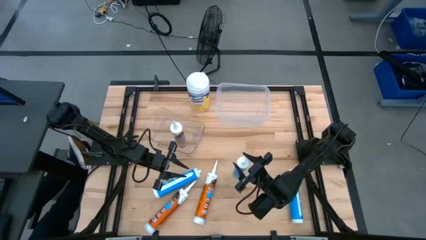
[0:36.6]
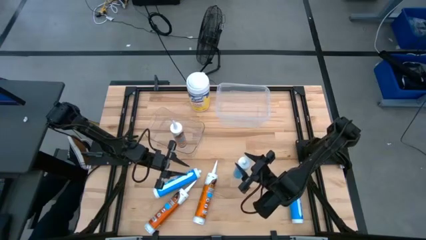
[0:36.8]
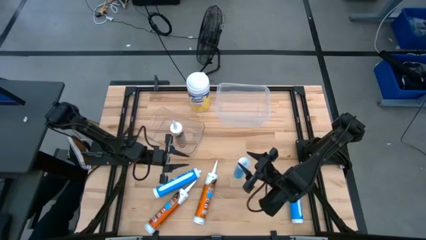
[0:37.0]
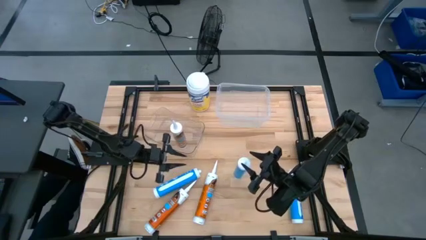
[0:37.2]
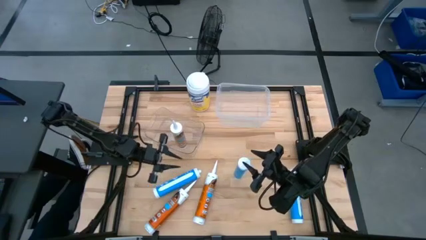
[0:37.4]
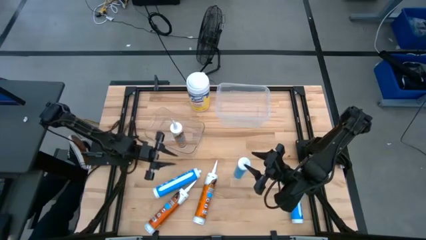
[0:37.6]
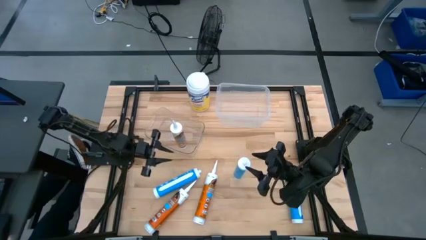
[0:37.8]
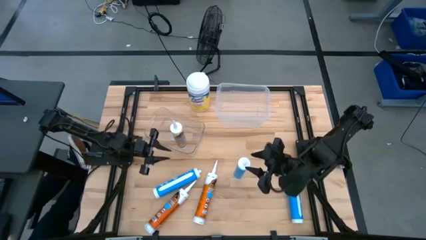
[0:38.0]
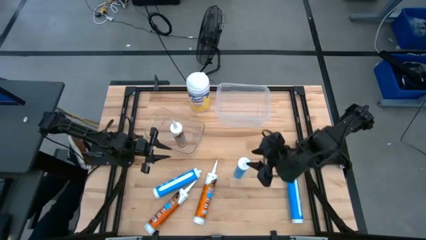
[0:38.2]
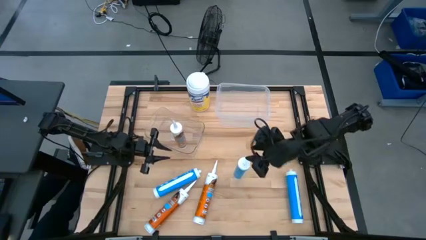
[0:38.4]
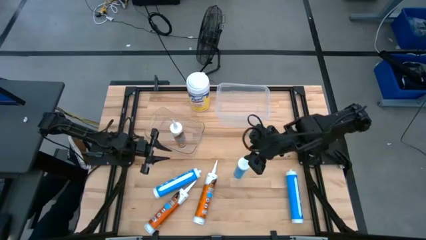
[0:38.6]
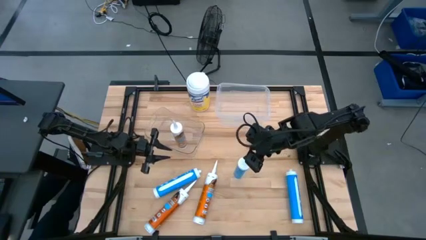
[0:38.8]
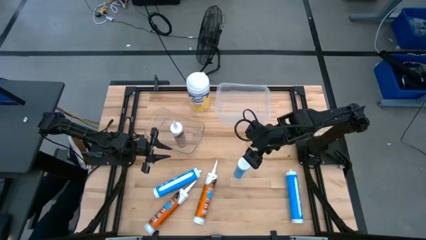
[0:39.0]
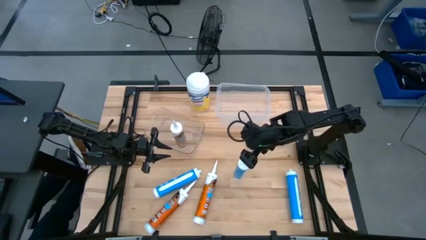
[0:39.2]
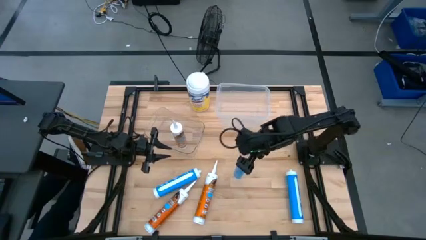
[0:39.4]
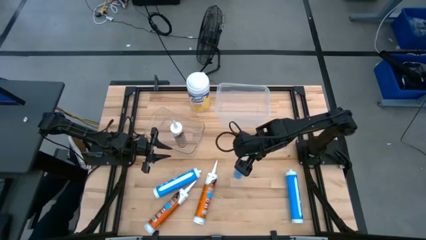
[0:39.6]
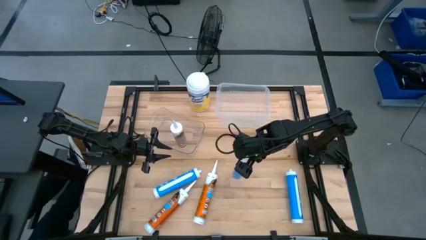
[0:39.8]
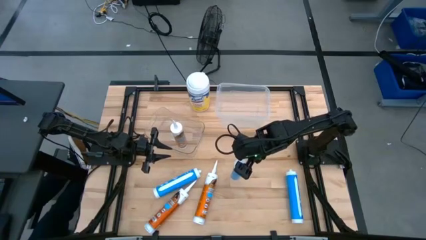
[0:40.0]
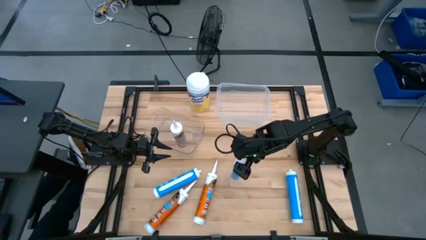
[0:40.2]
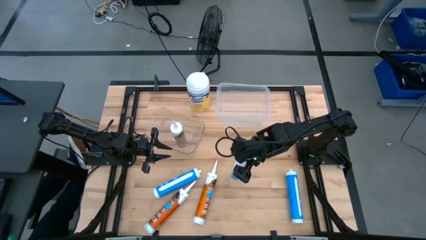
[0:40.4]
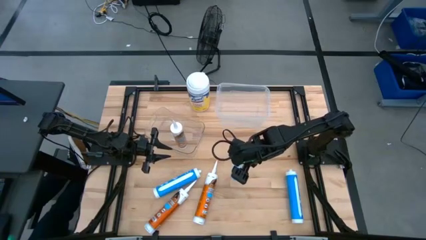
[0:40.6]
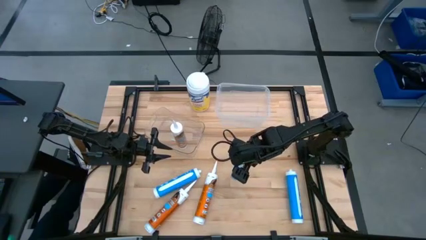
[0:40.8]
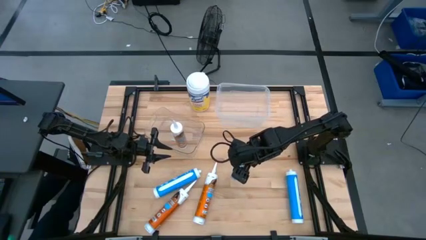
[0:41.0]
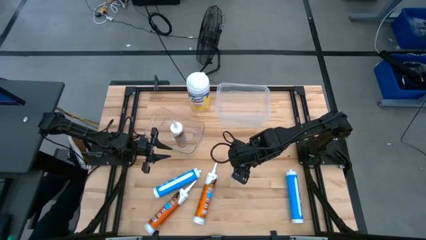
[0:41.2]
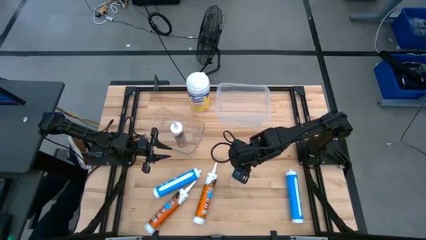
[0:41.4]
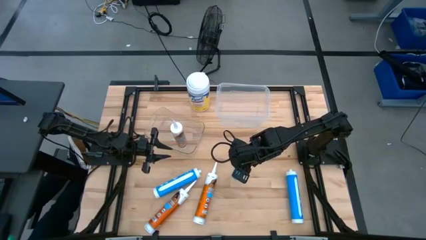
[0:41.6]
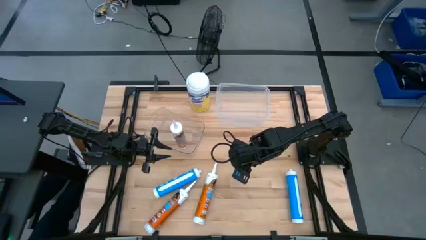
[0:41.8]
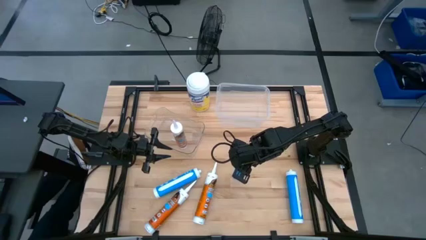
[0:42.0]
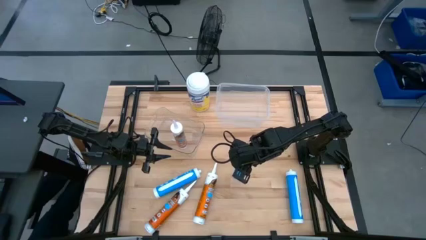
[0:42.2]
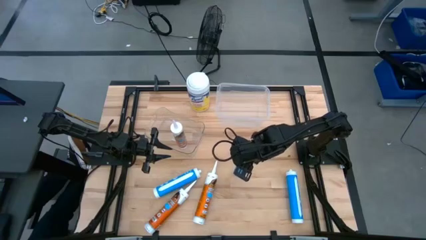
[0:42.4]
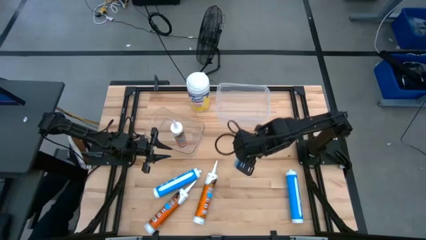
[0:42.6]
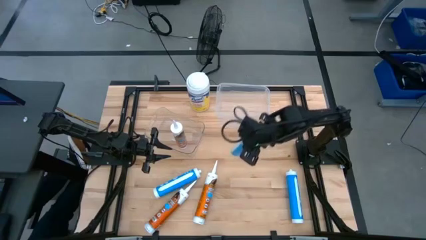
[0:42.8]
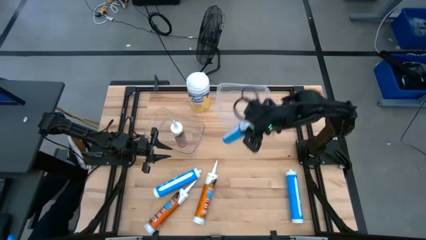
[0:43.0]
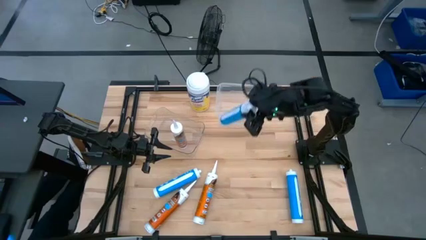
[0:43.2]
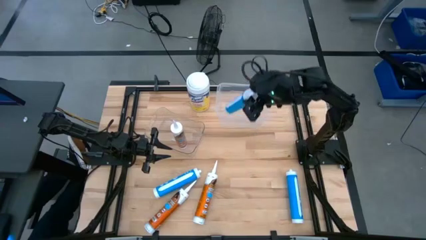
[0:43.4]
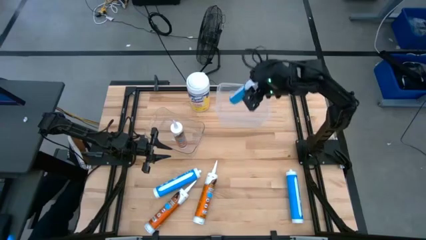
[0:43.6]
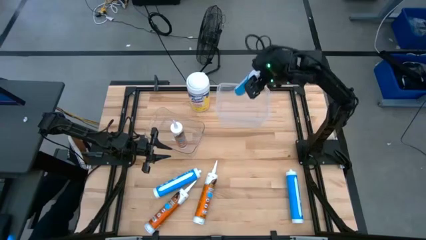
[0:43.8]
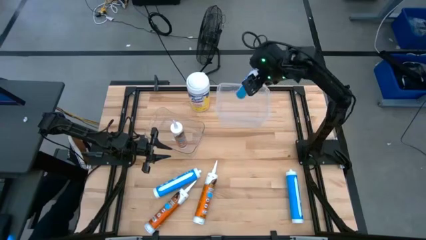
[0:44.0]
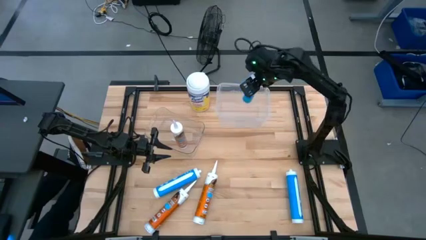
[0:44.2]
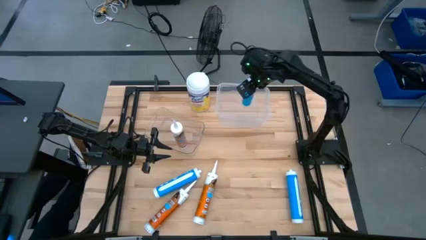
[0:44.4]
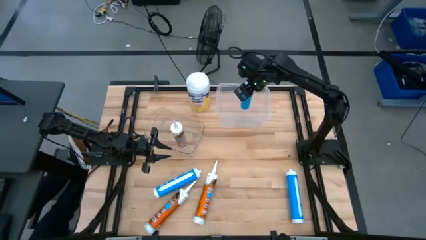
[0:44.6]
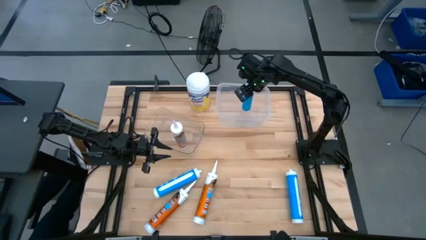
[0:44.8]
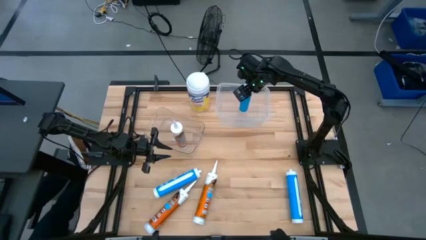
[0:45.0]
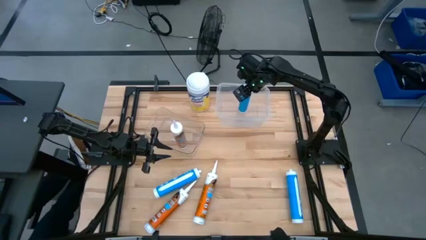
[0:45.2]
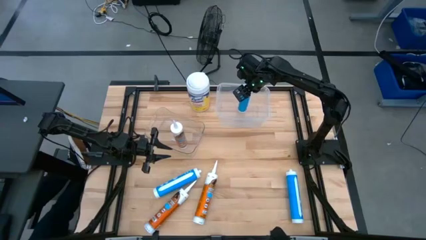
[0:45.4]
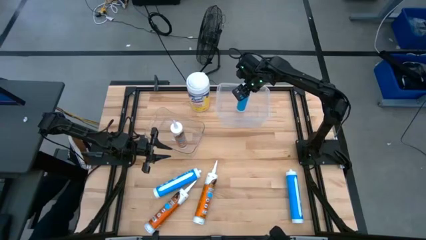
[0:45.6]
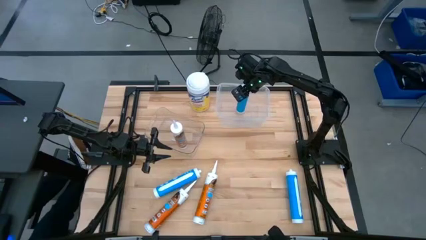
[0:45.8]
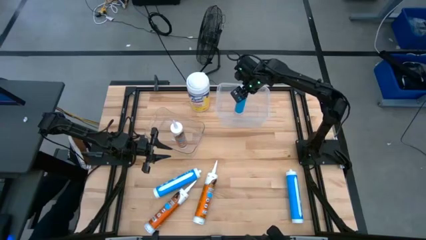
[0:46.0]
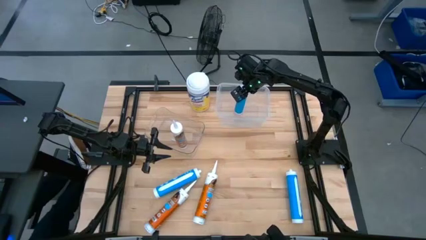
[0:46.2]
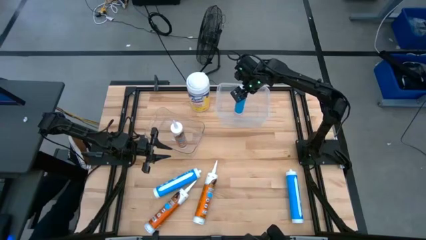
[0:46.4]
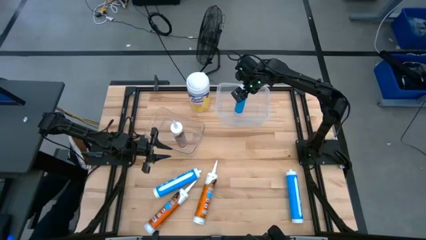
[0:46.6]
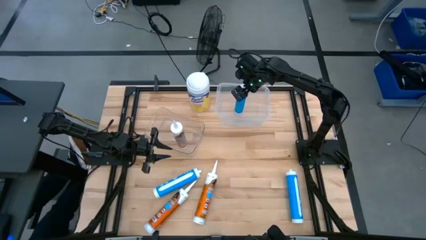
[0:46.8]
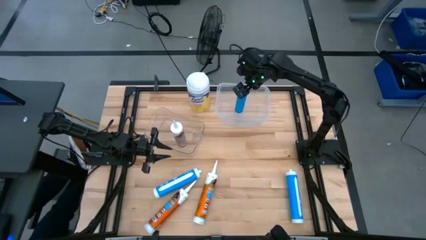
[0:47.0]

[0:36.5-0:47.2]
Task: Pick & place silicon tubes, Sealant and Lysol wipes
Put the middle blue sealant into the top transparent bin
